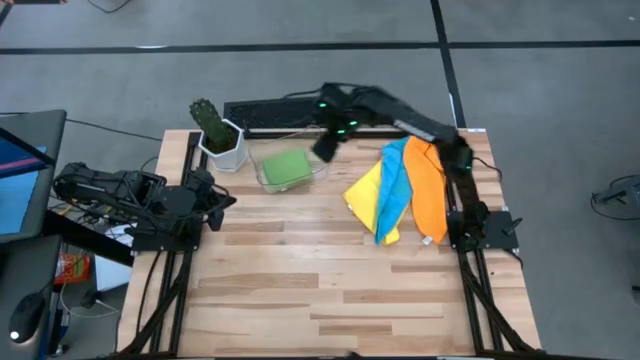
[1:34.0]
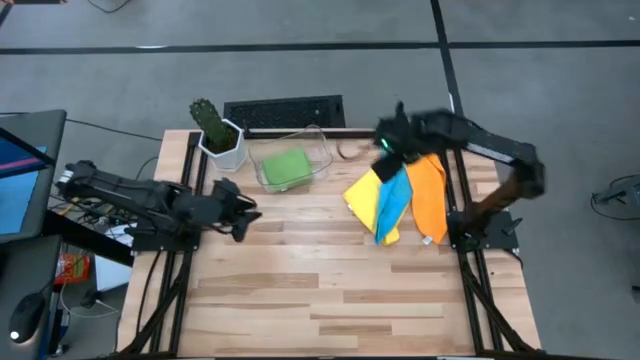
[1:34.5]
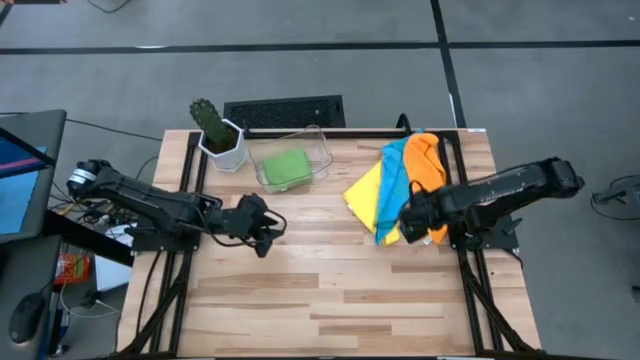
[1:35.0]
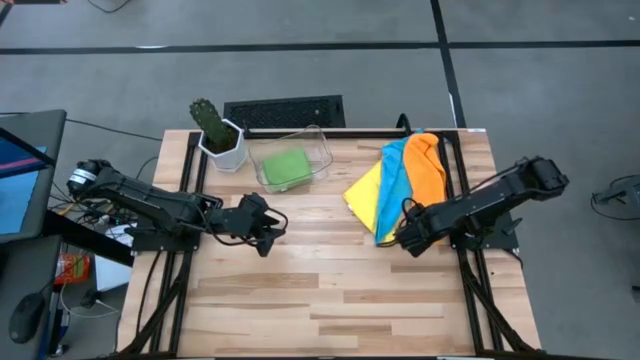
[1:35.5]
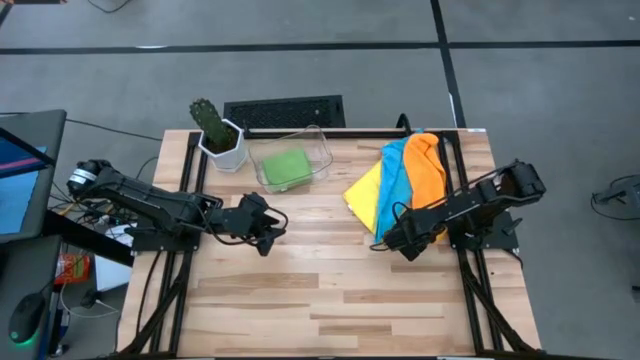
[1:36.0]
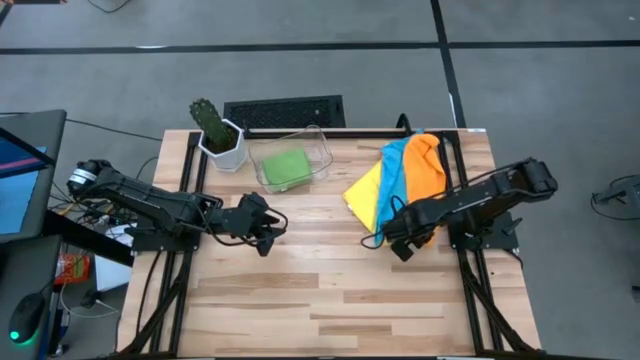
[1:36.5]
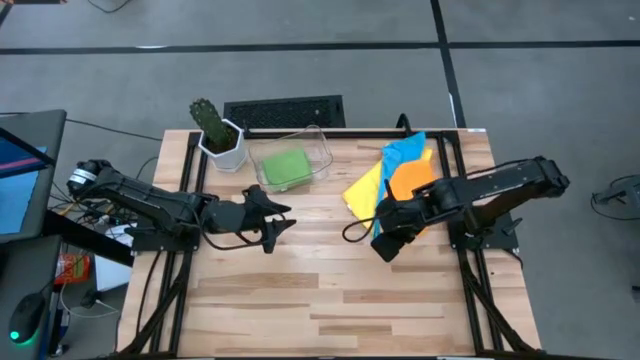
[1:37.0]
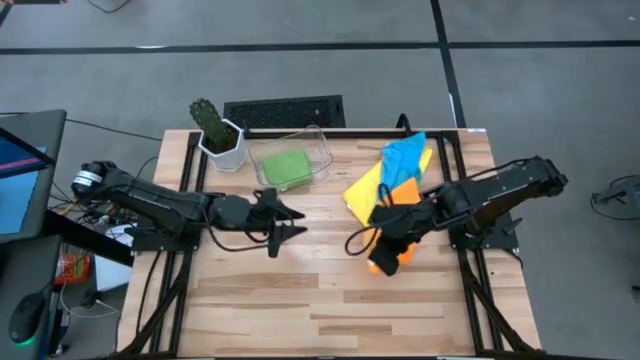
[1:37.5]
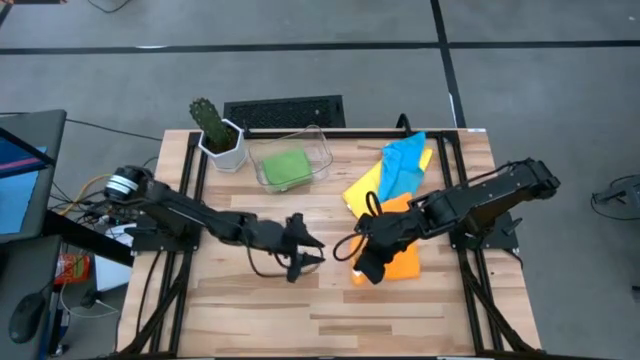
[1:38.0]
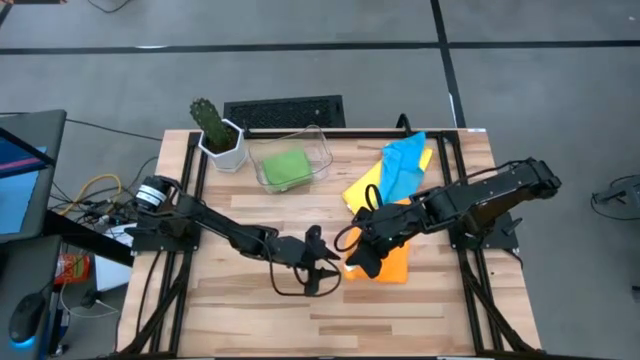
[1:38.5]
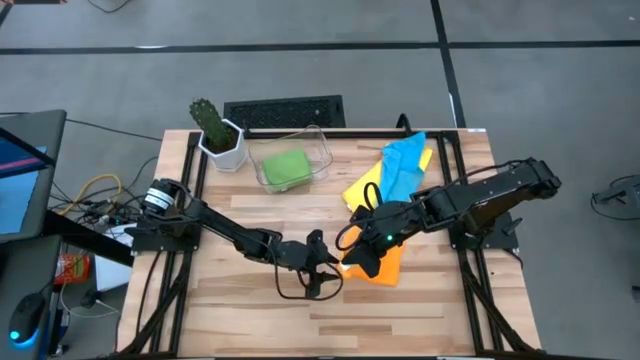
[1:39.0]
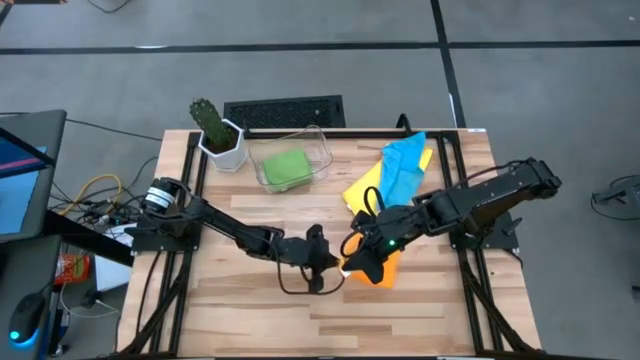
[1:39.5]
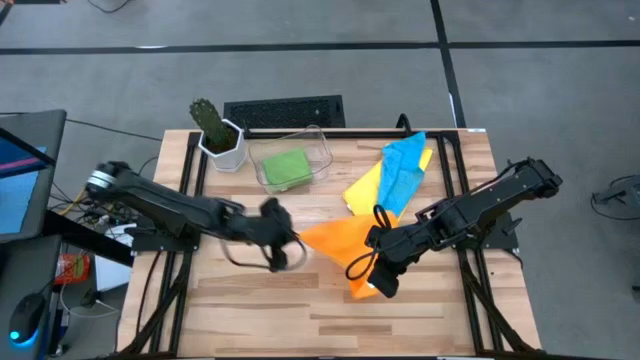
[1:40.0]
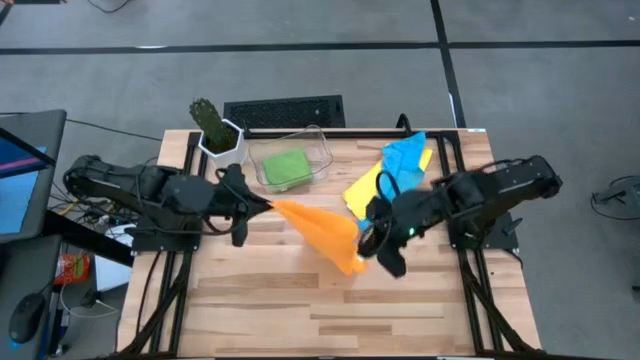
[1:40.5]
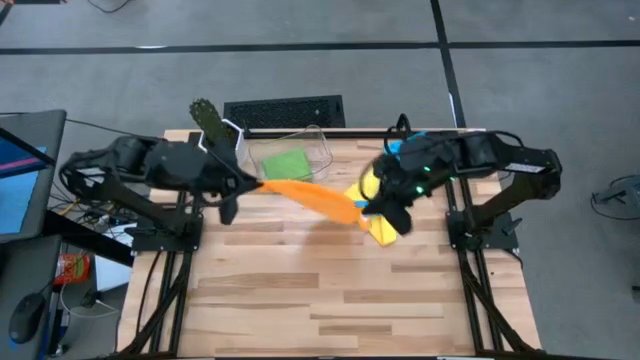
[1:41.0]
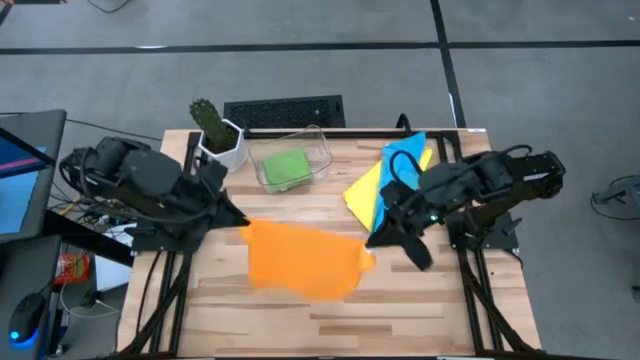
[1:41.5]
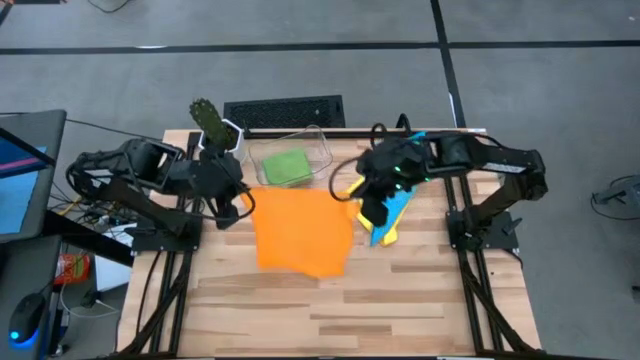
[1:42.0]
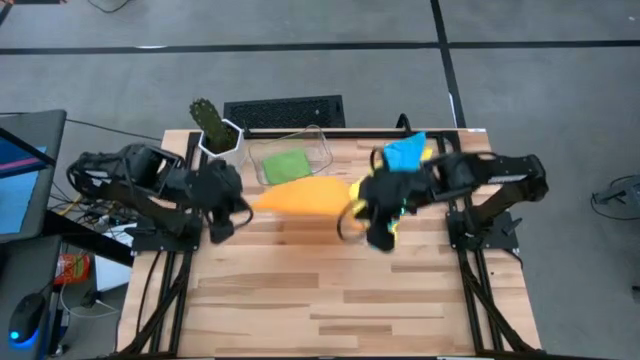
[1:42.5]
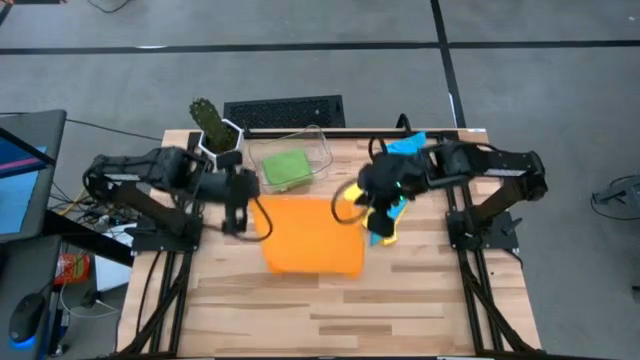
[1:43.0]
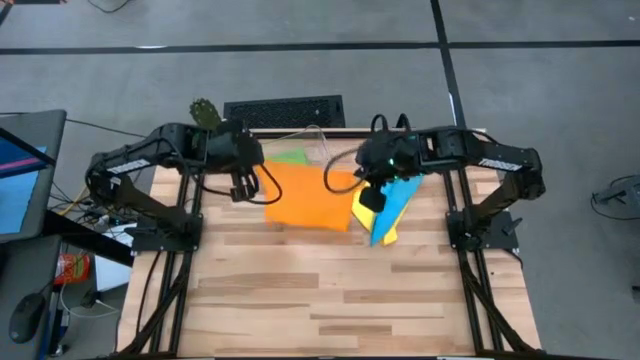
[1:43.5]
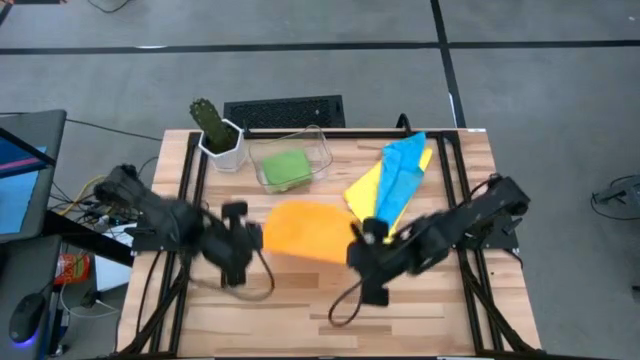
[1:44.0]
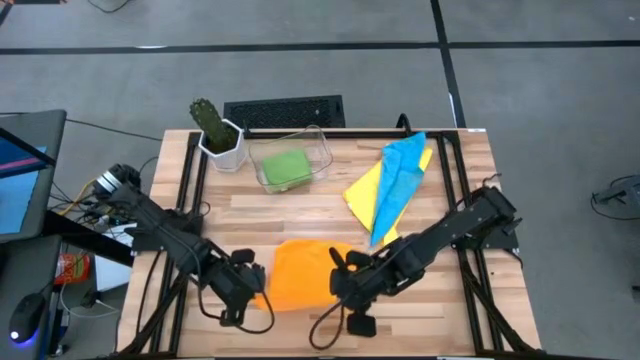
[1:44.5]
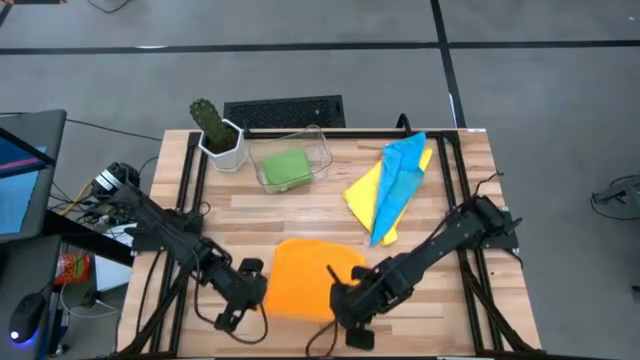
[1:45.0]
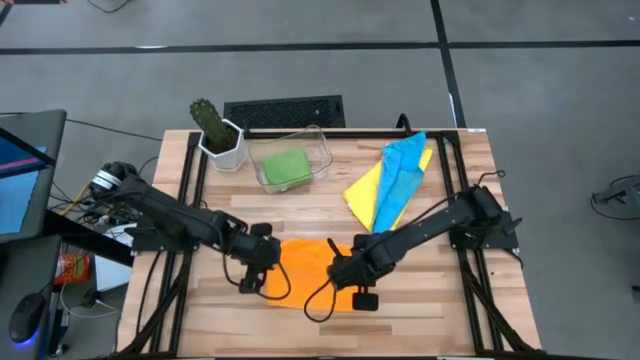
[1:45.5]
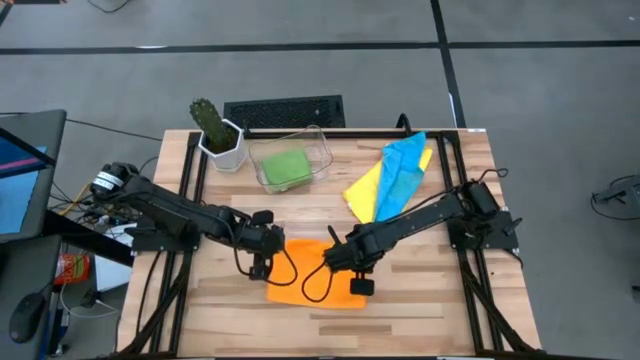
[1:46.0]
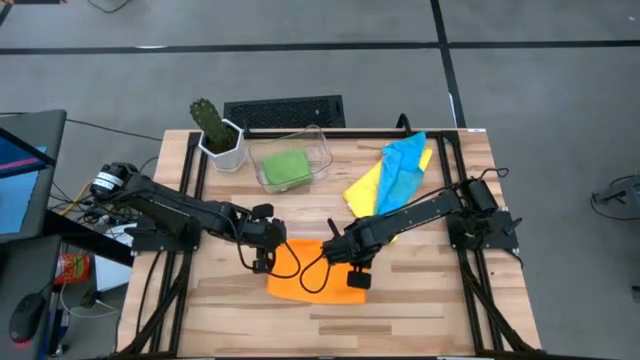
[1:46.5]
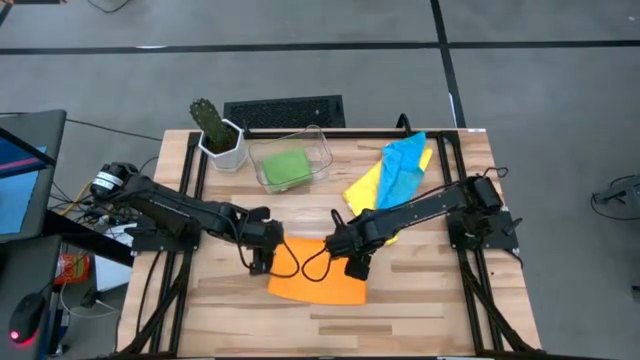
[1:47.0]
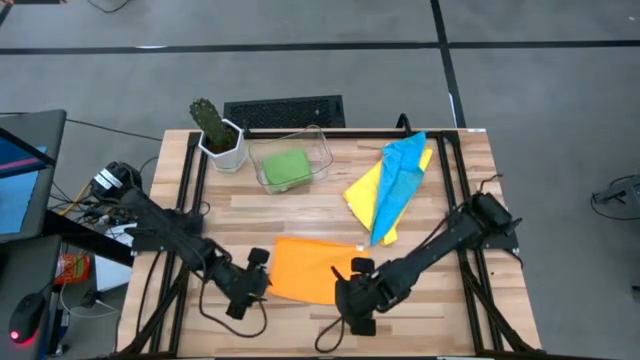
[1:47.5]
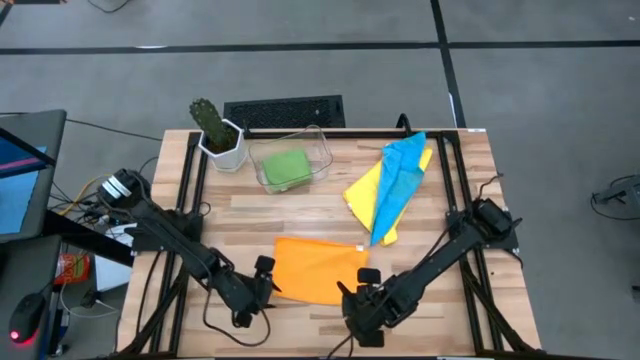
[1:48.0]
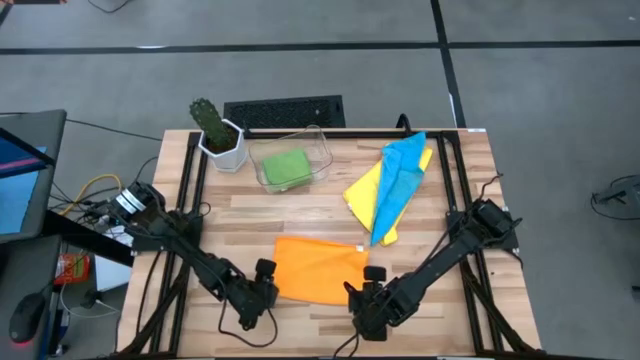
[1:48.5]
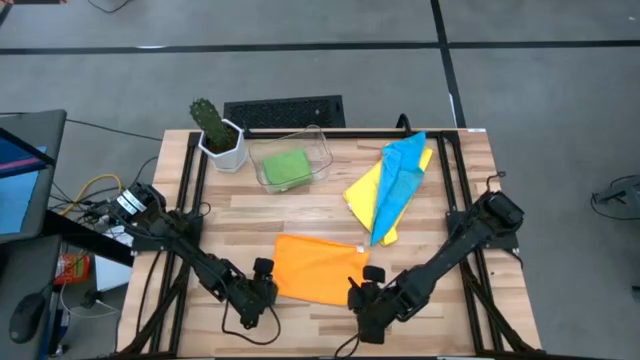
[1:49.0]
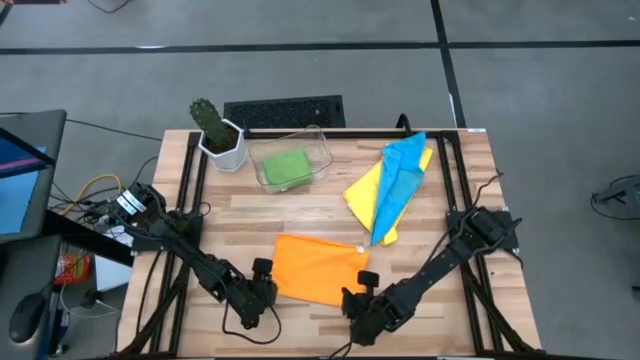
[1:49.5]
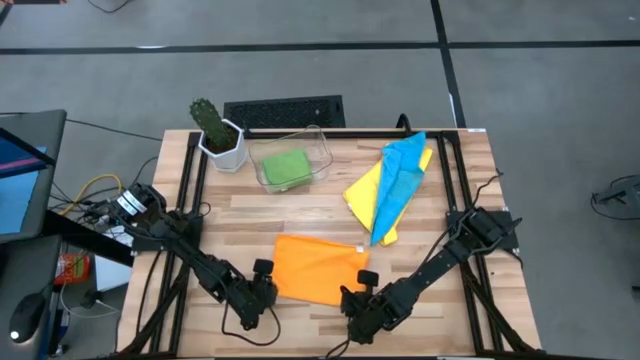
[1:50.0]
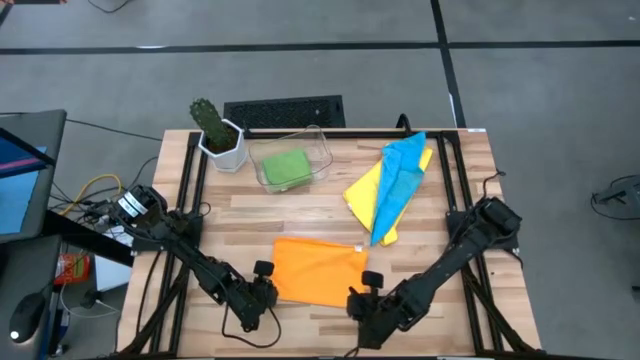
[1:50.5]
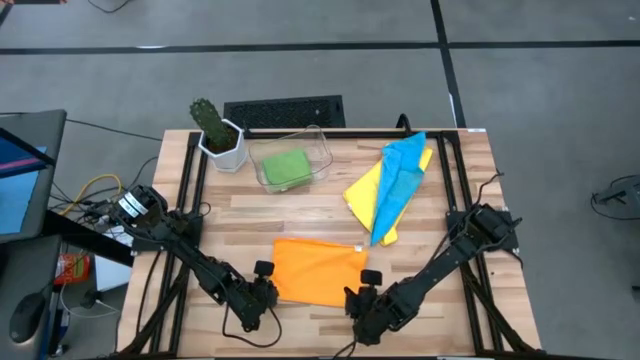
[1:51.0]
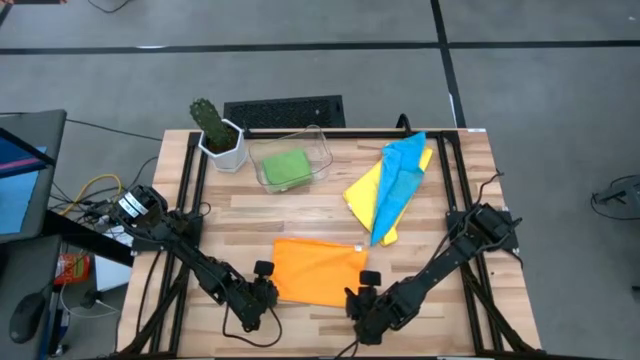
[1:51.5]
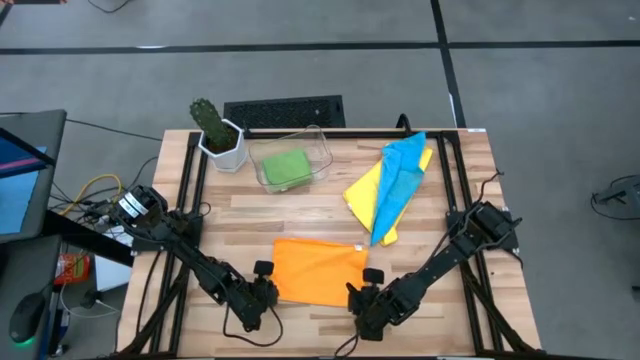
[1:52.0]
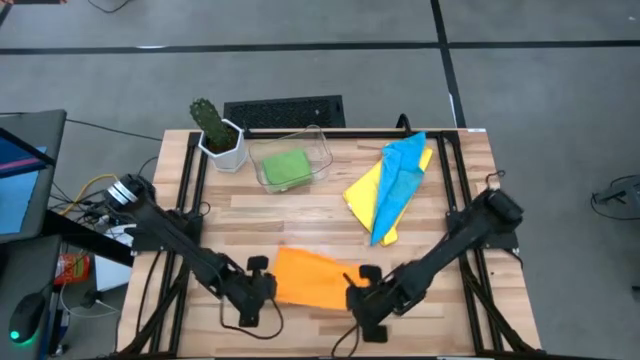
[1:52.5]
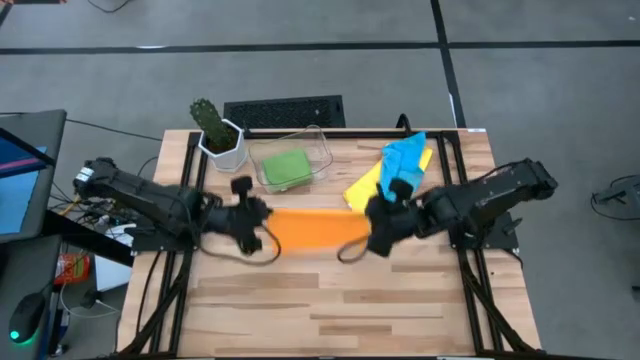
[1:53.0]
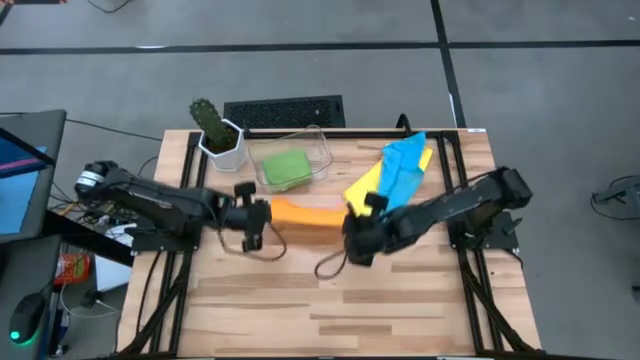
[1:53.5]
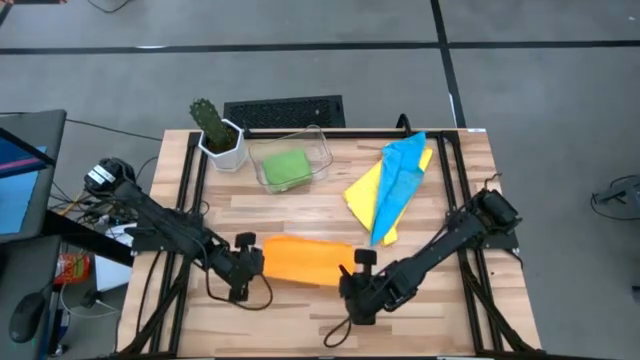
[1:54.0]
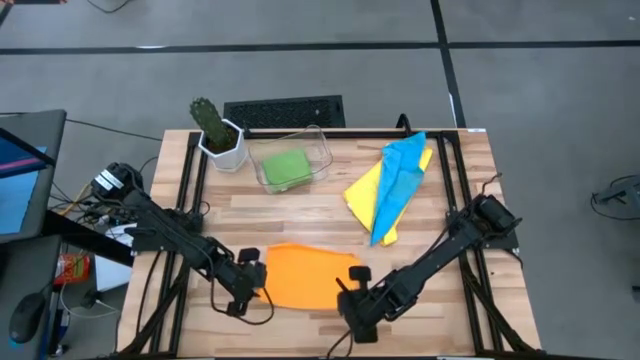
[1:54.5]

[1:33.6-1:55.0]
Task: Fold microfiber towels
Fold the orange microfiber cloth
